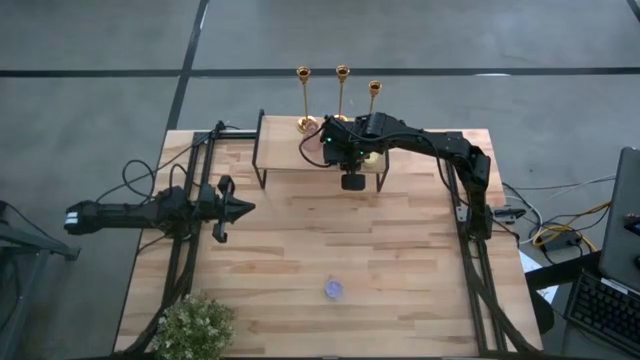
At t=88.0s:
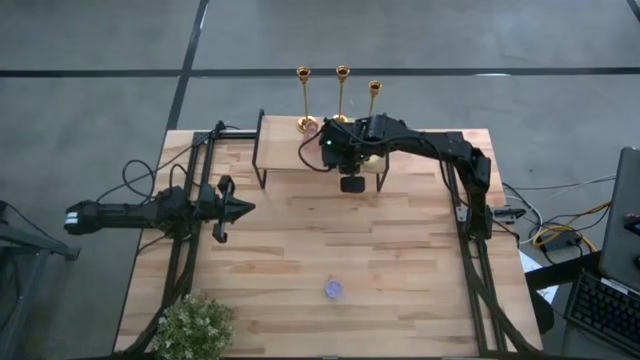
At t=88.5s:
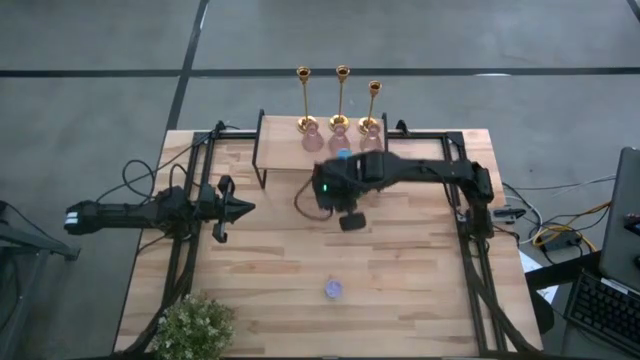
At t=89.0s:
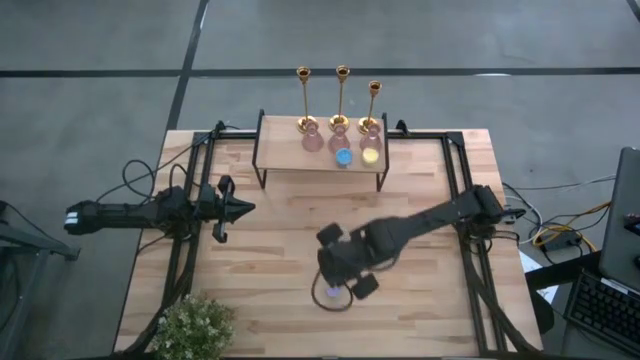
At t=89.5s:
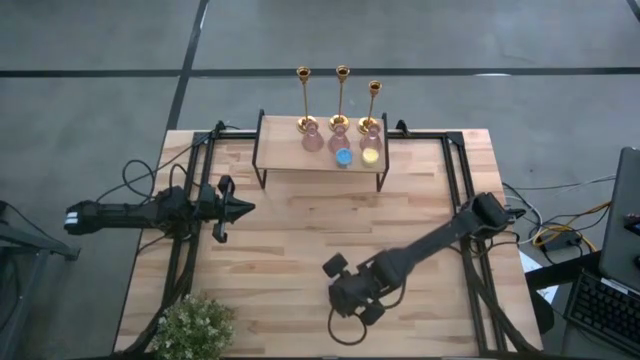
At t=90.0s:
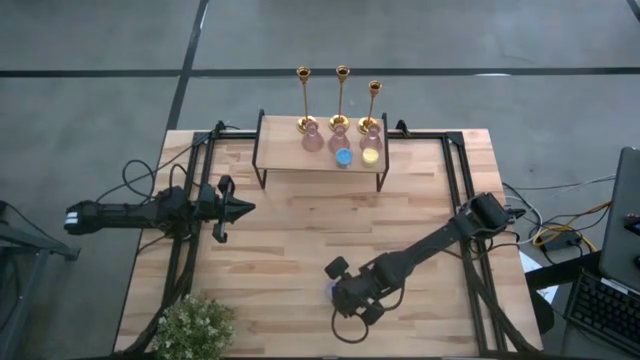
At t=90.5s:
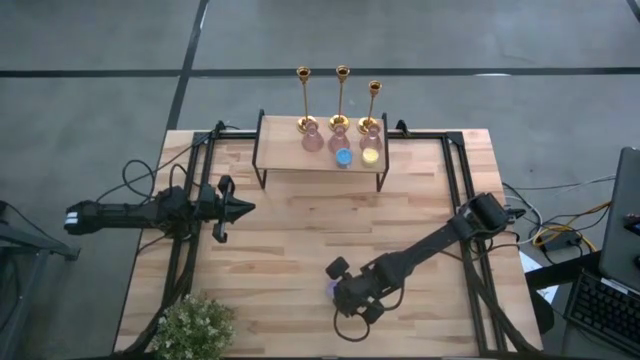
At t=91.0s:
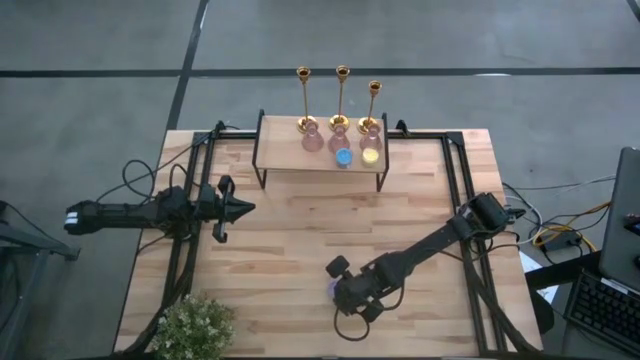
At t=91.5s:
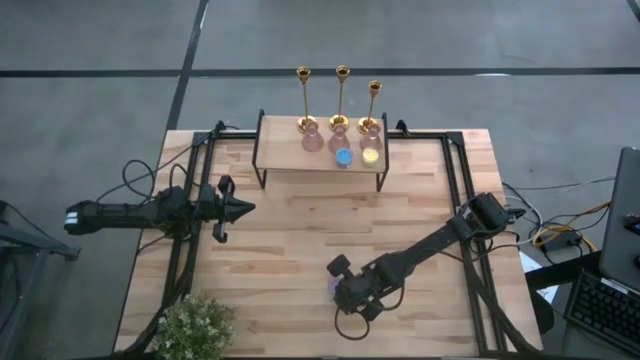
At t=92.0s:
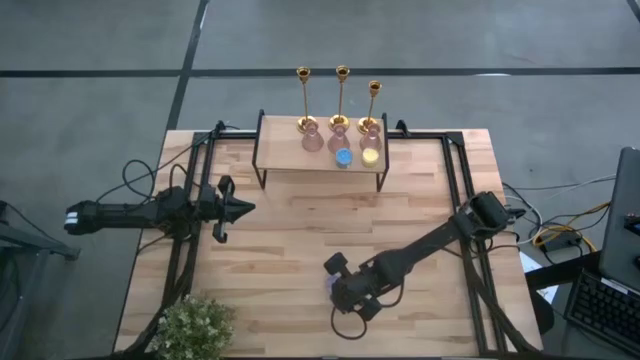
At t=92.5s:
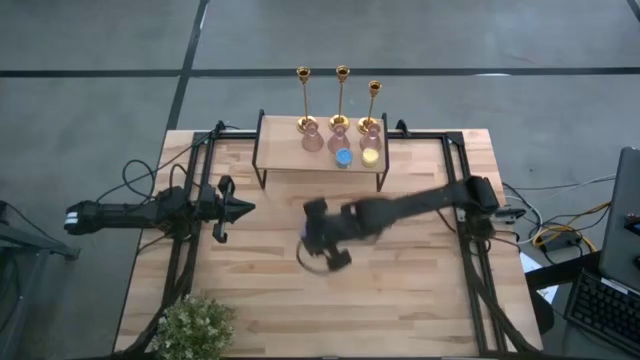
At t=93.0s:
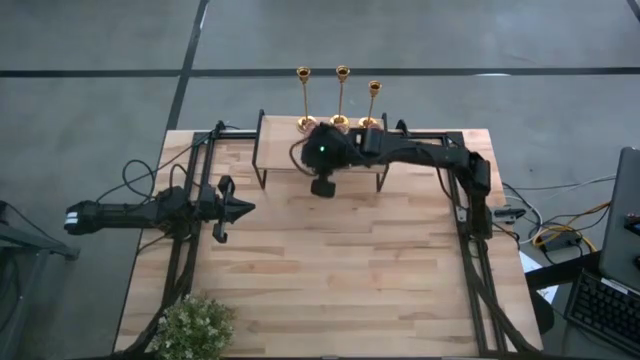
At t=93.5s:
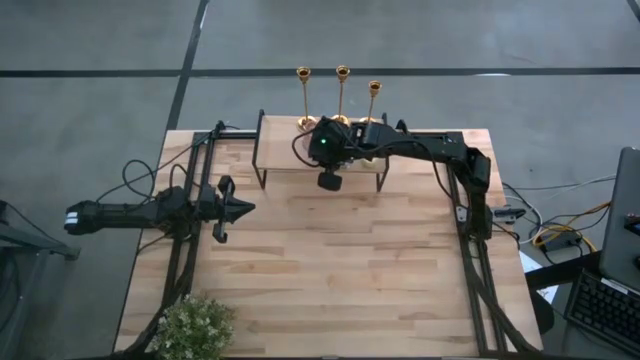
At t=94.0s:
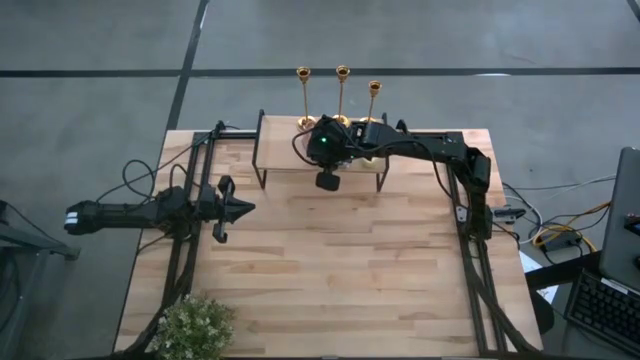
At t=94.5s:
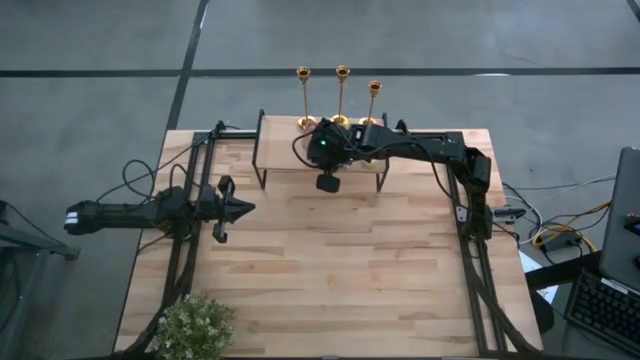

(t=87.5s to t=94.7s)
Task: Pick & Place candle stick holders
Put the purple scented candle on the shelf aligned with the other blue and yellow scented candles

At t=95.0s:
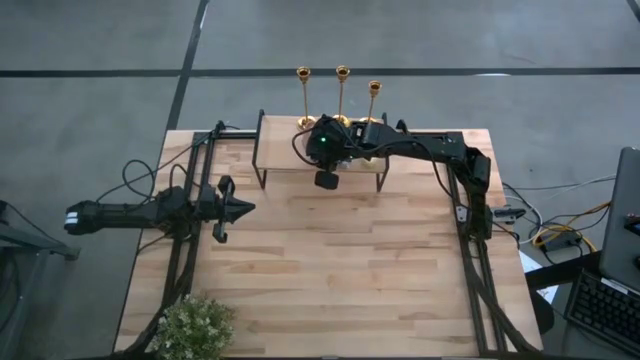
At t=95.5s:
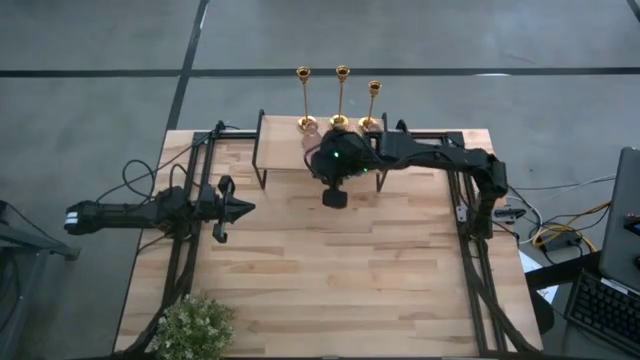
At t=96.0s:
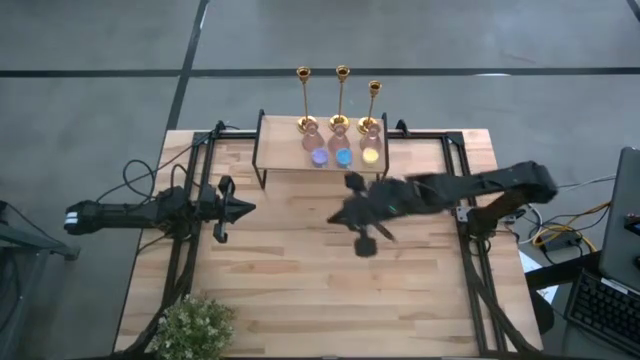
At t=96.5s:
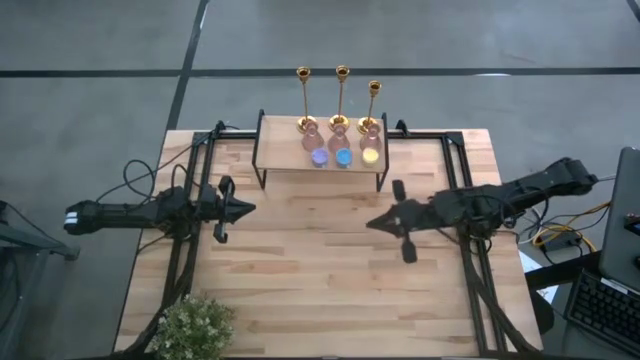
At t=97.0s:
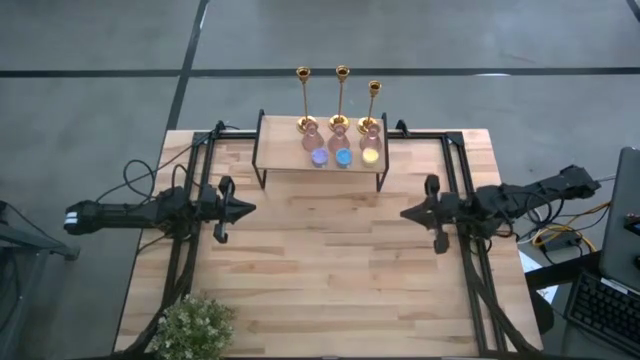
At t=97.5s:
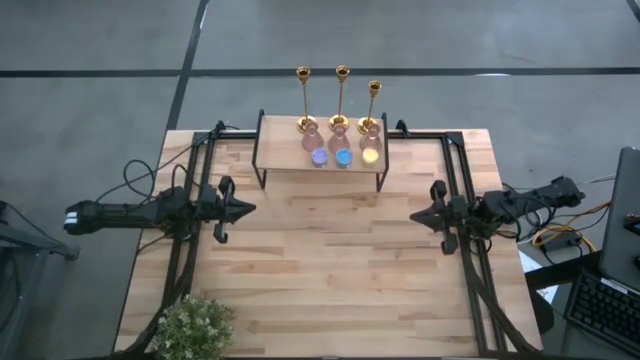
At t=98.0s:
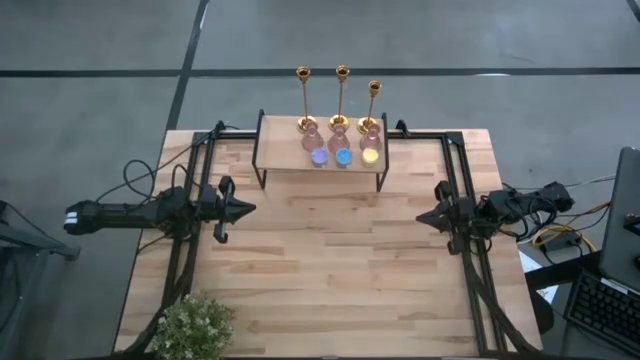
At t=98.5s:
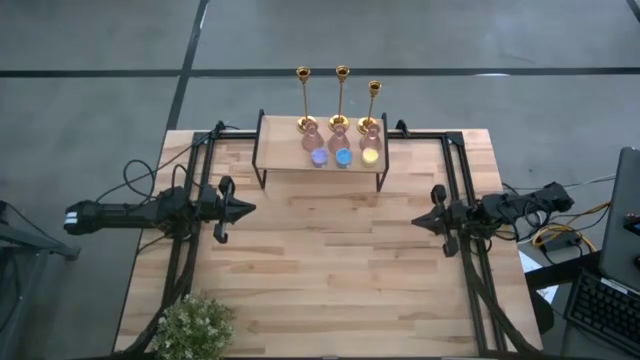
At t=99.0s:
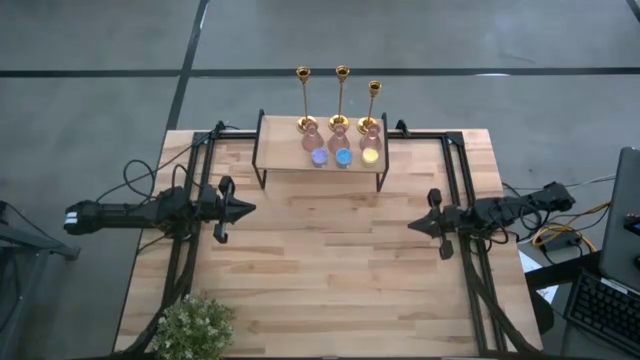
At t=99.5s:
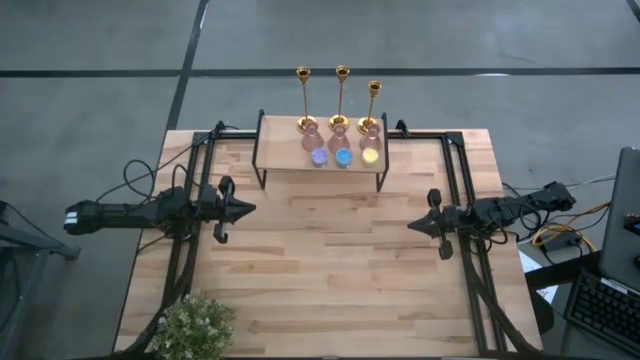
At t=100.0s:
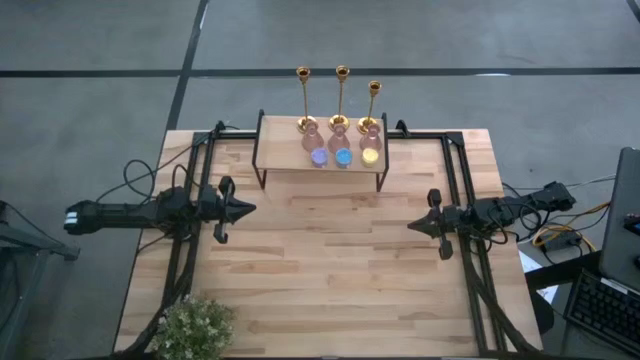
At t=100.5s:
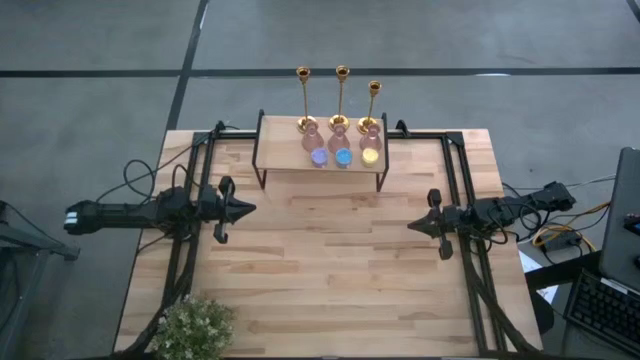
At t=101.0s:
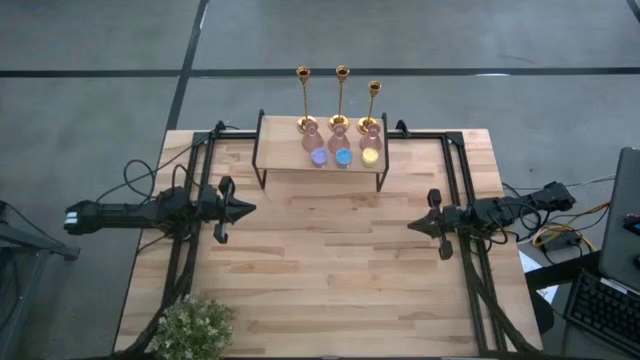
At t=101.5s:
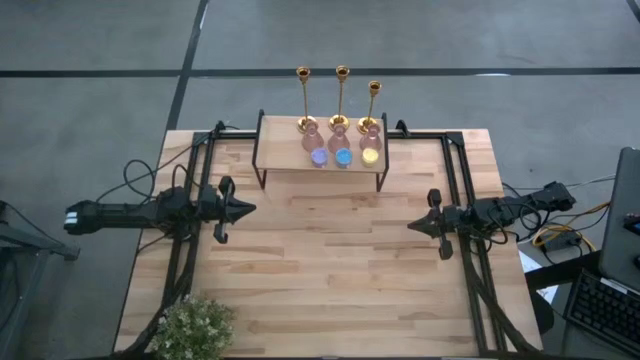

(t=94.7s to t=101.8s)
Return to Home Position

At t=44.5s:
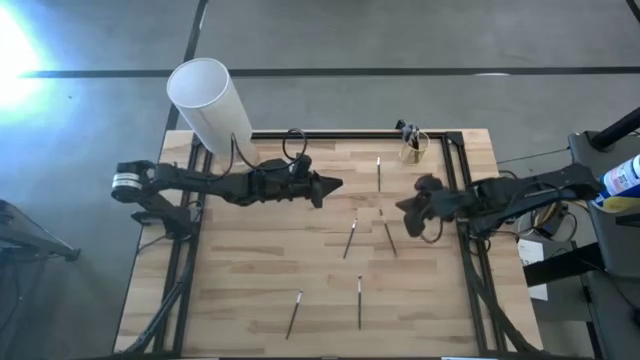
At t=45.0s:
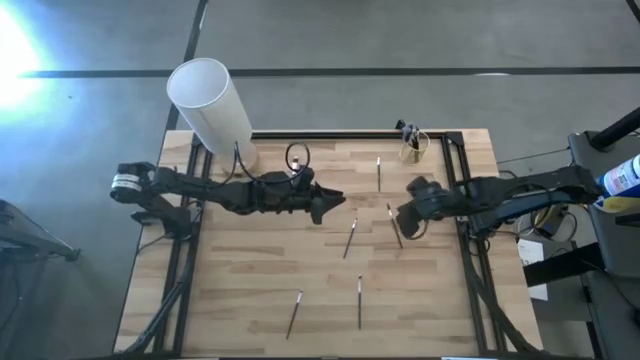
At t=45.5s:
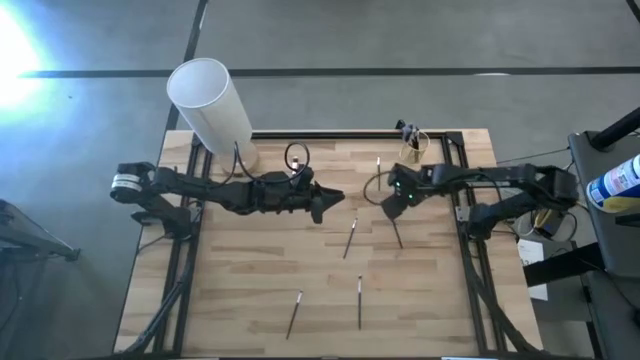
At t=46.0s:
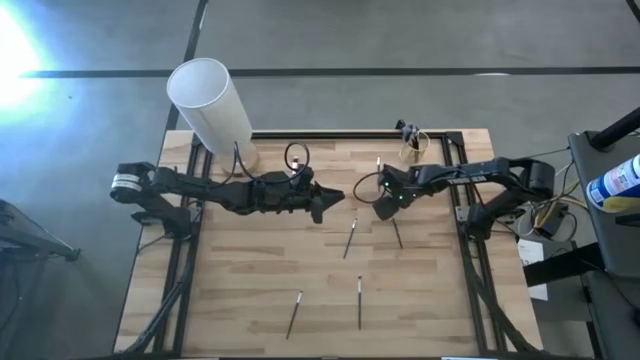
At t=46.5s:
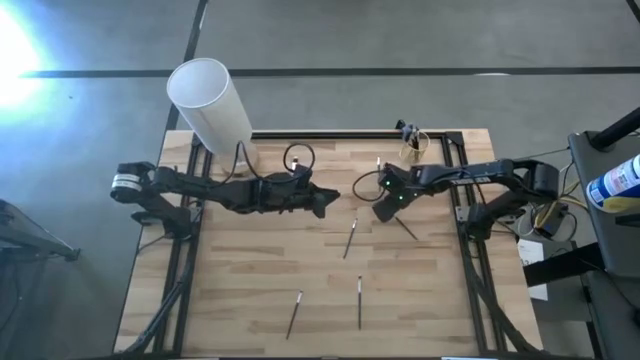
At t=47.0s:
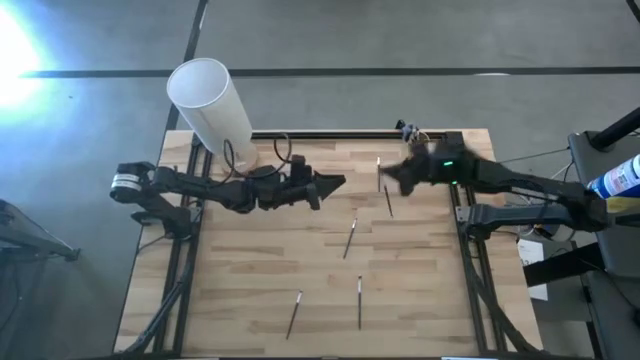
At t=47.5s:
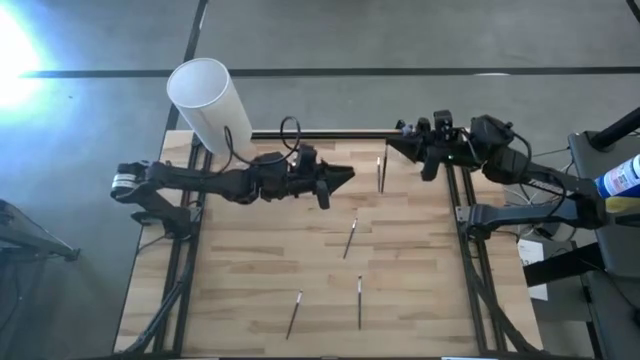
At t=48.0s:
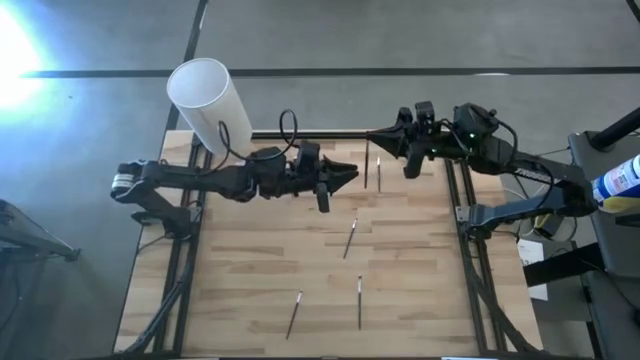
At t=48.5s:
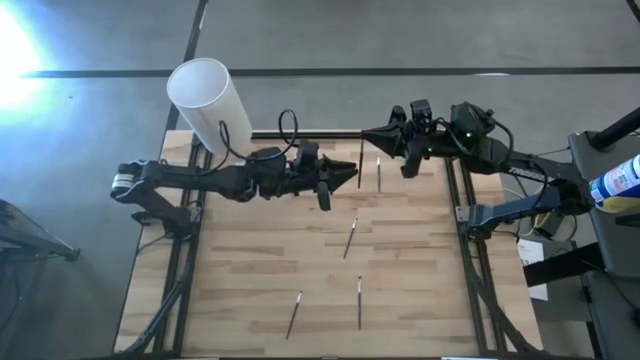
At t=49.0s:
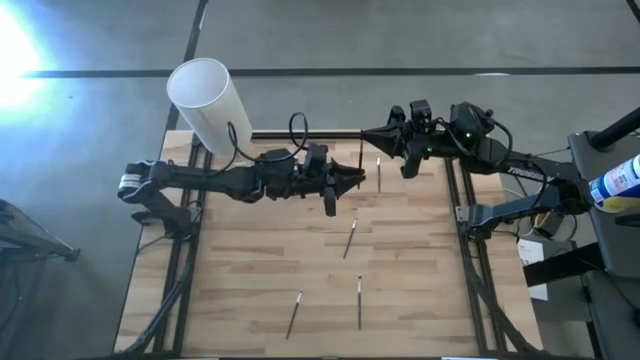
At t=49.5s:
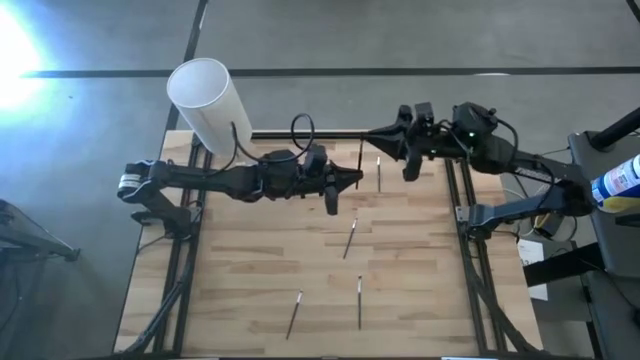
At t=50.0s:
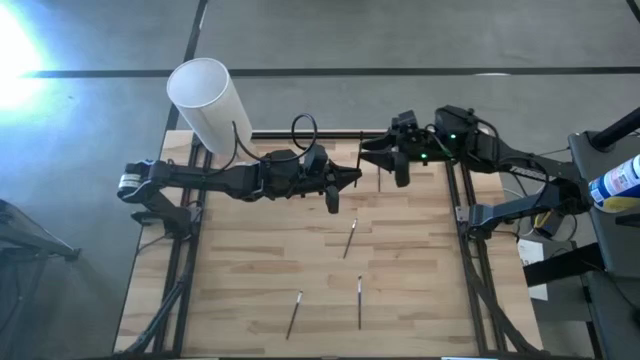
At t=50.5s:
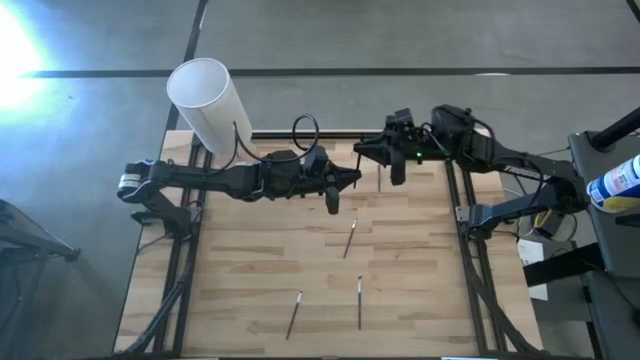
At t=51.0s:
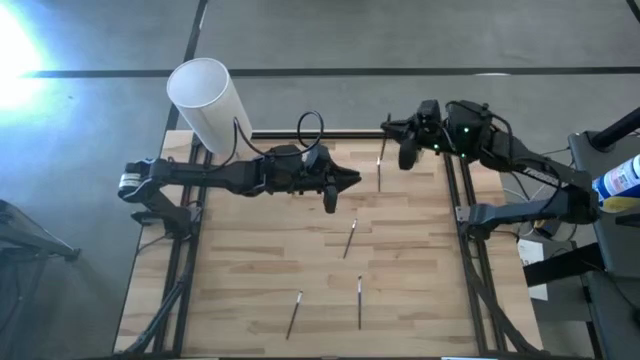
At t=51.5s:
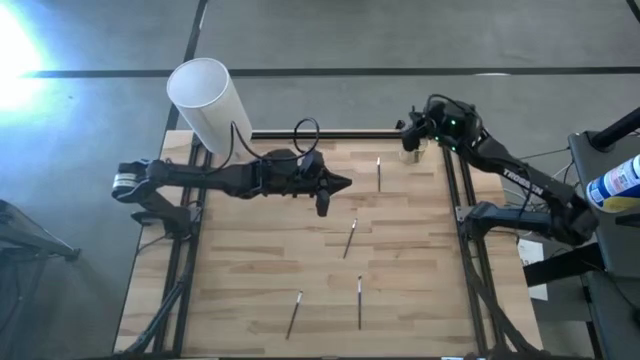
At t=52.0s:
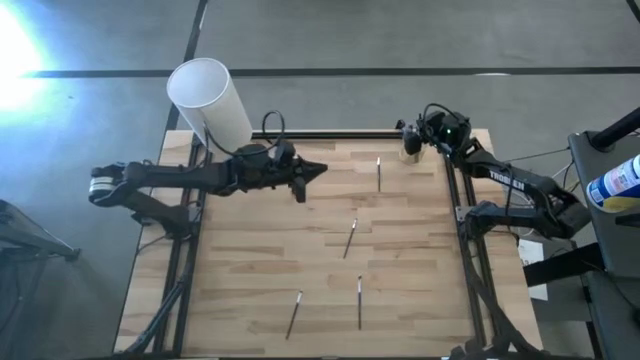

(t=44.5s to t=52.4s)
Task: Put items in baskets/containers
Put the lash brush into the yellow container
